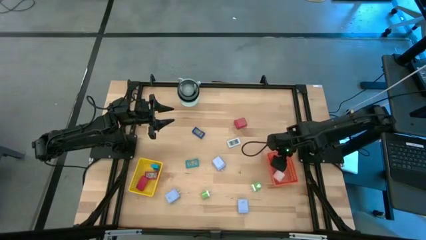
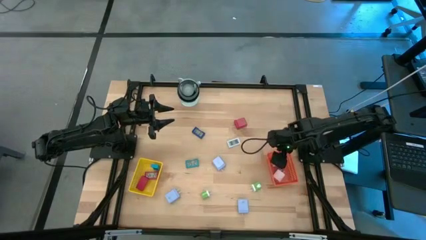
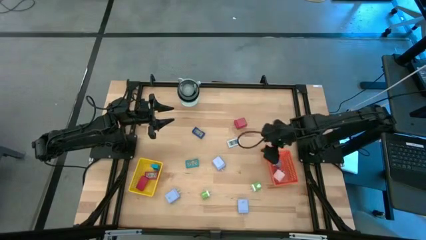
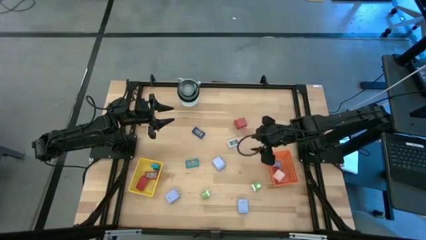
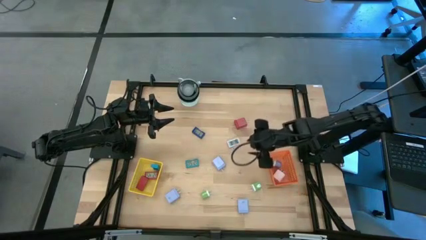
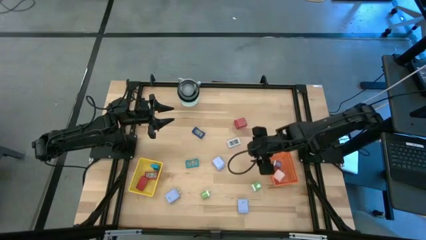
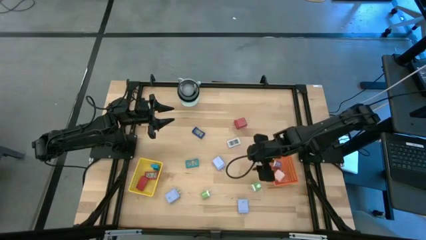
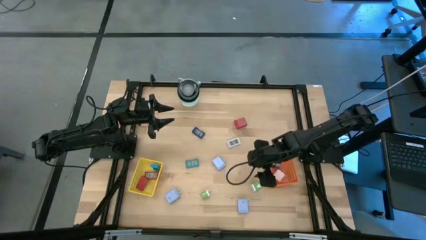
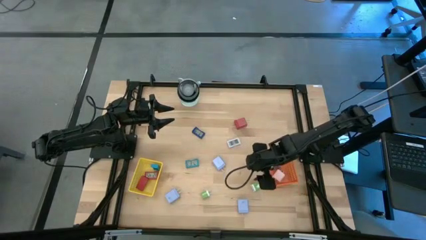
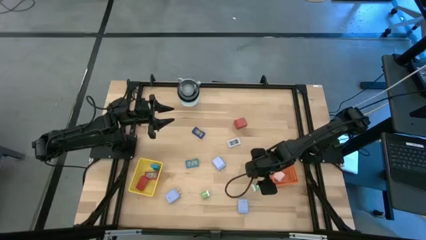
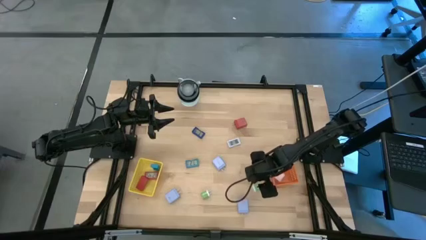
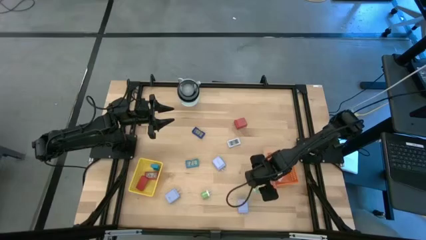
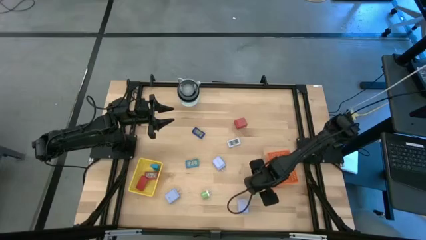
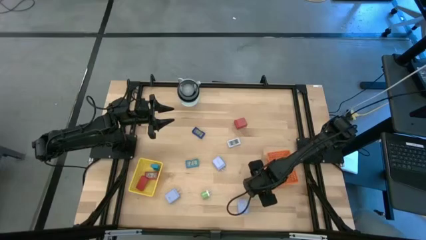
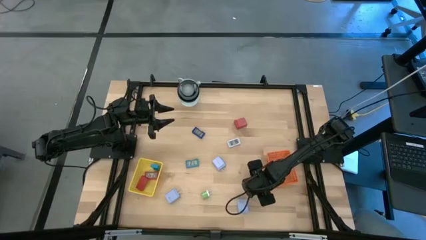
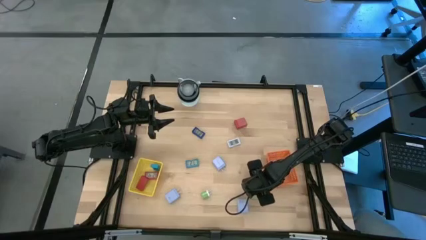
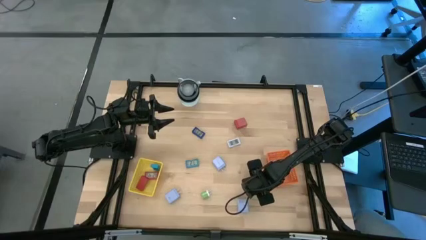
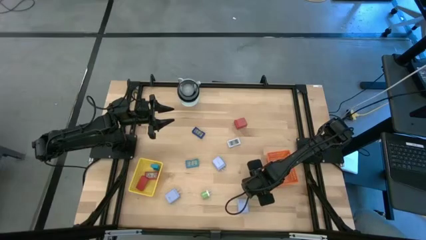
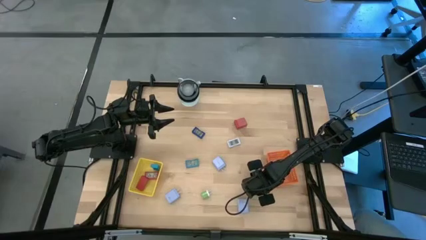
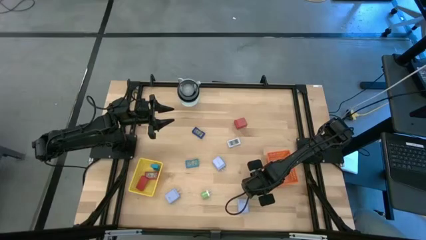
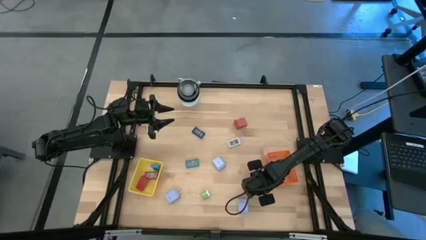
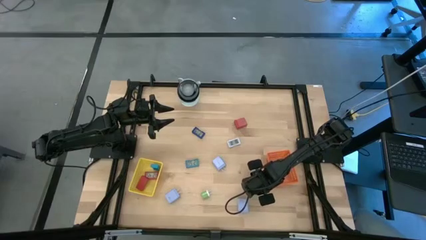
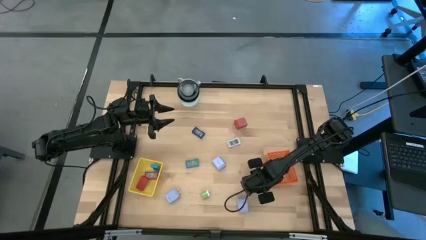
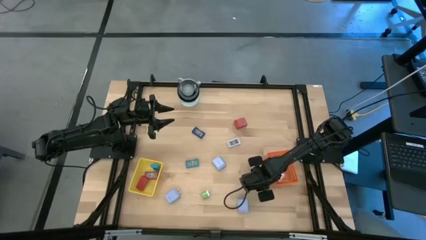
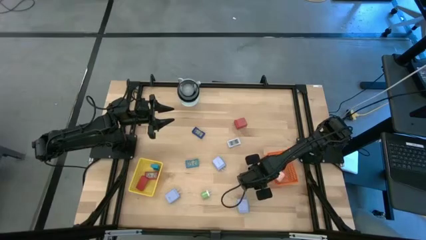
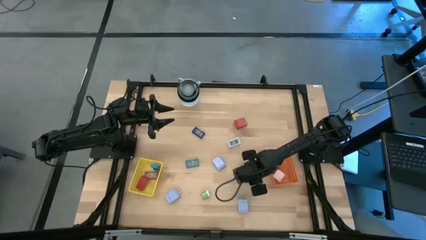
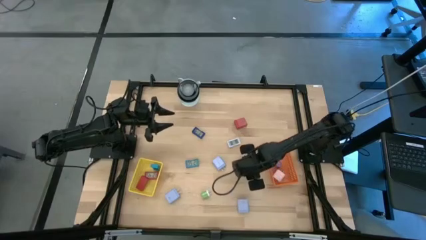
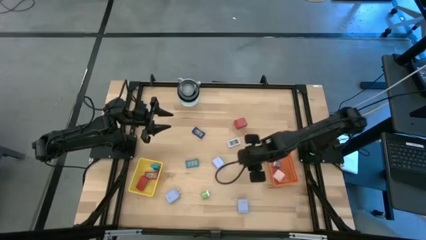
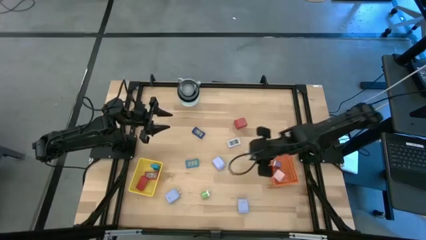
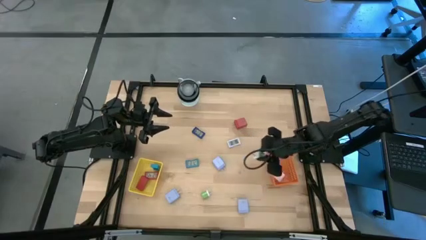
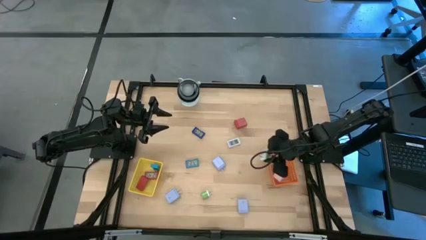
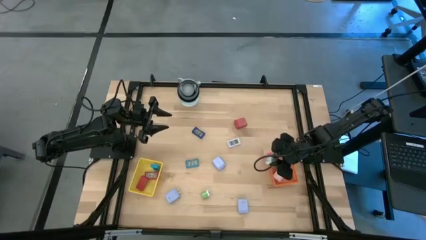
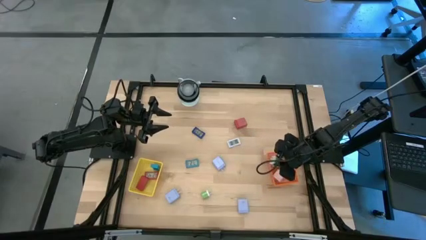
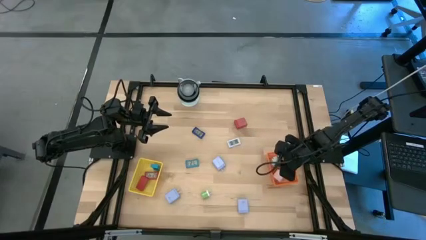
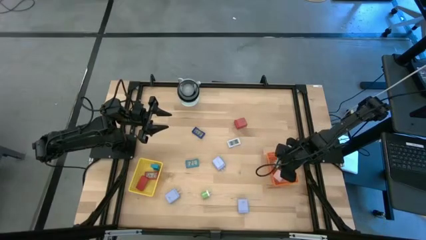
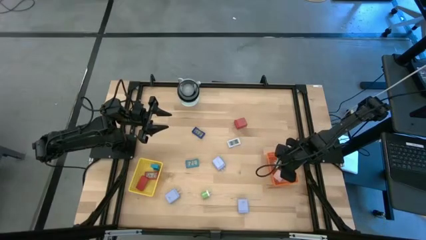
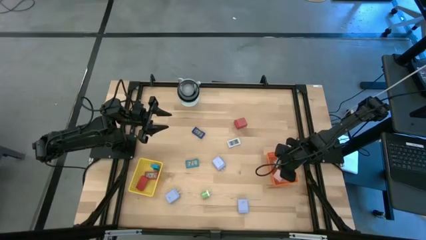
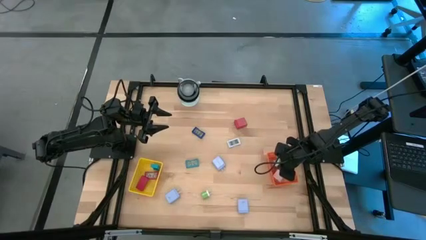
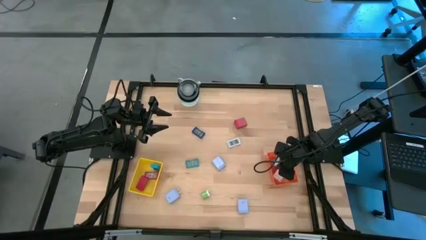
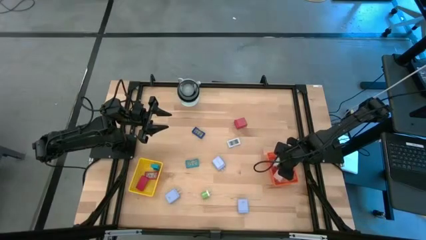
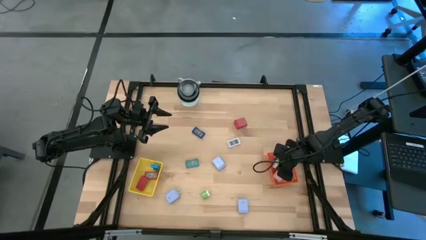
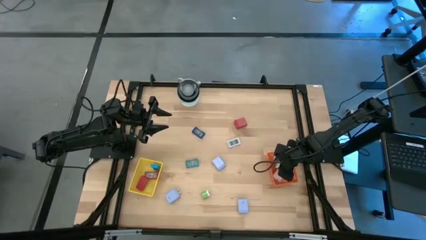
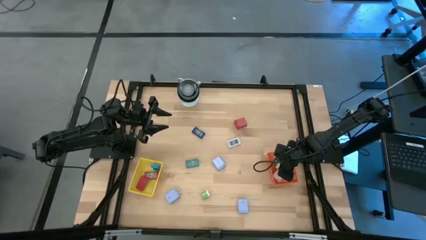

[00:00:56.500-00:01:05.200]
Task: Pick & Place Office items
Put the right green charger adapter into the orange basket

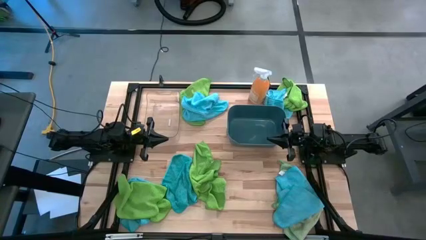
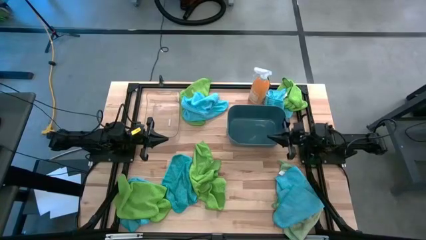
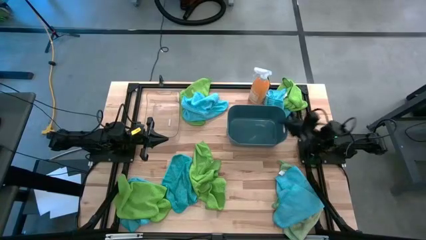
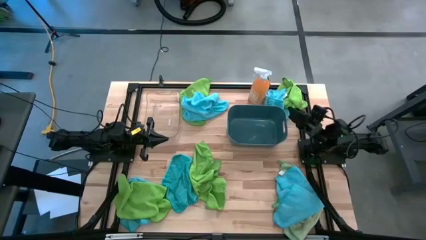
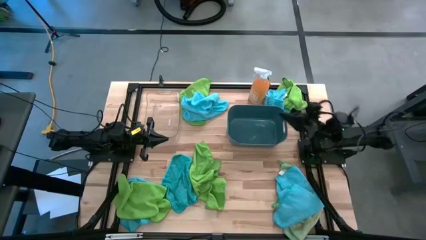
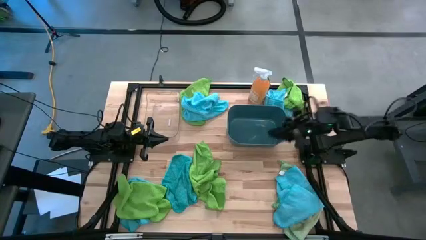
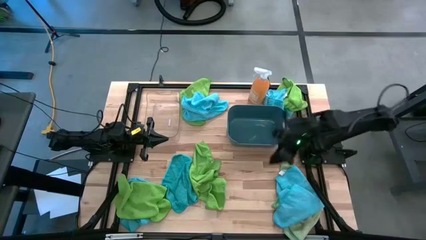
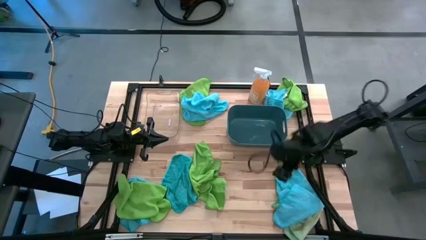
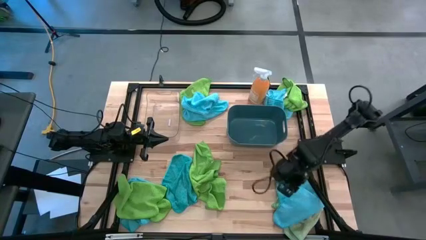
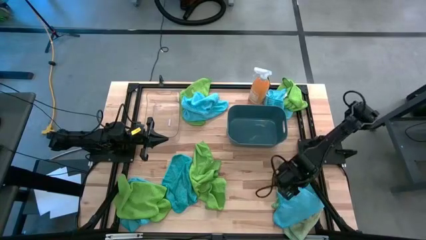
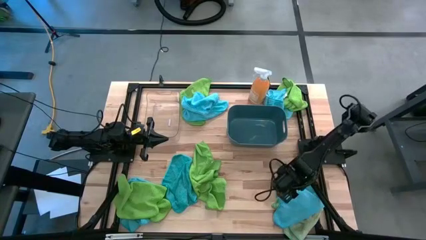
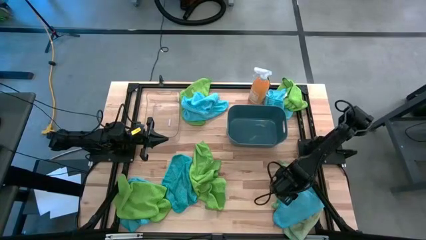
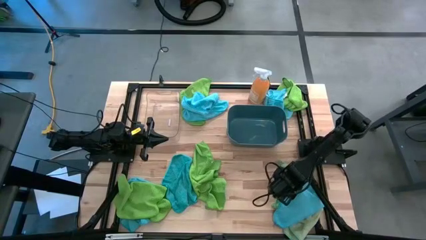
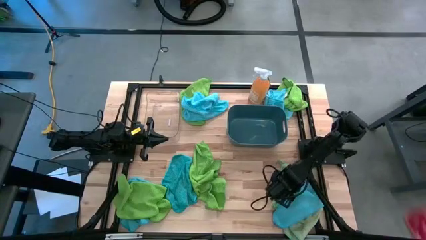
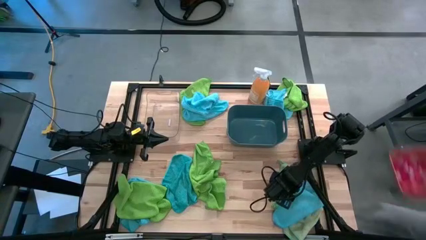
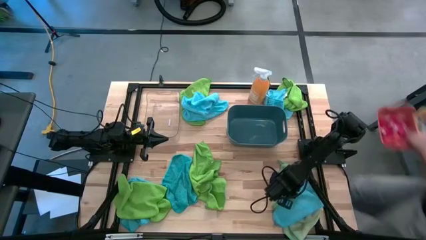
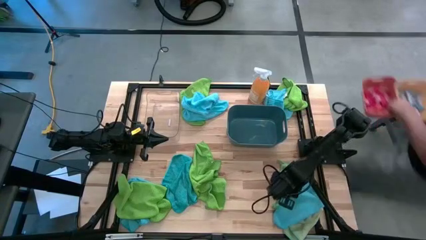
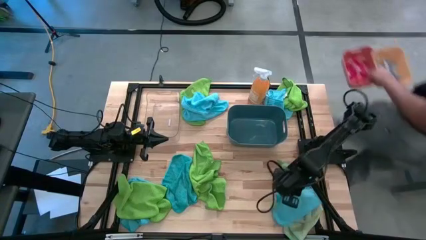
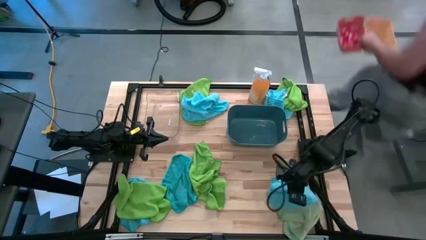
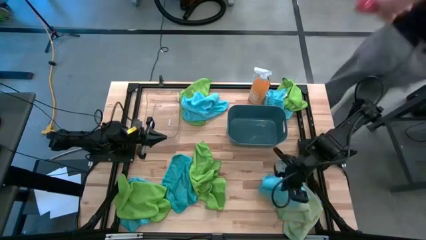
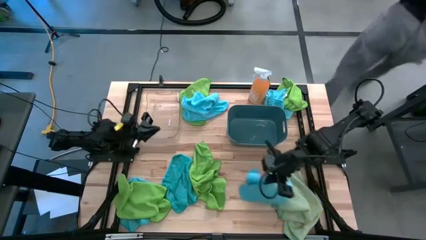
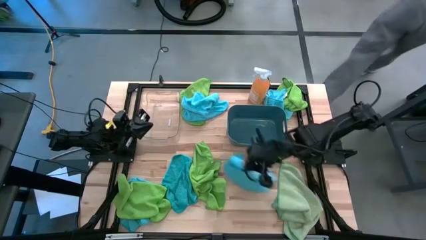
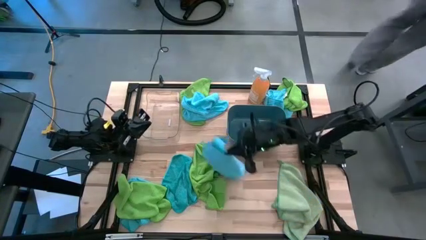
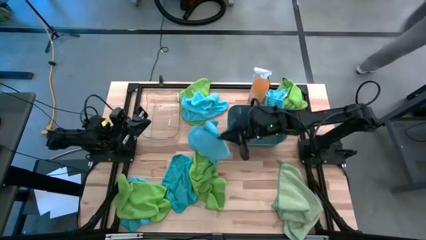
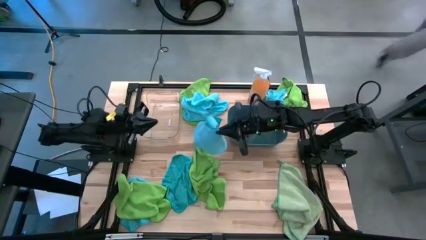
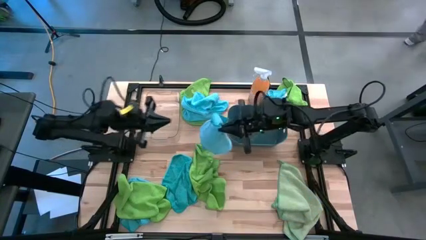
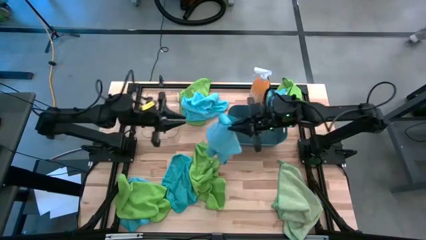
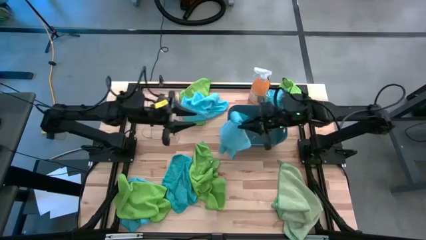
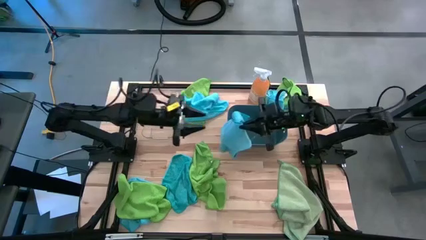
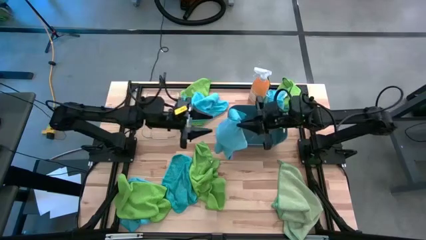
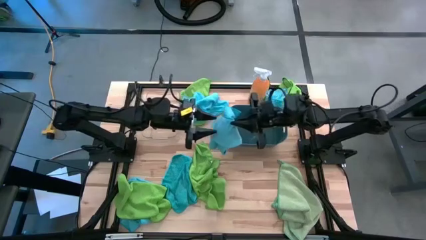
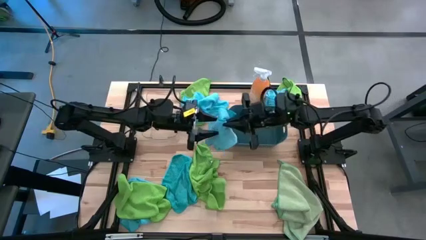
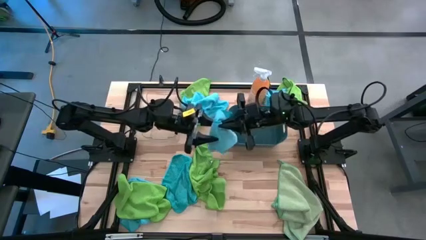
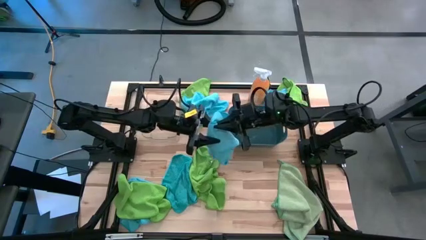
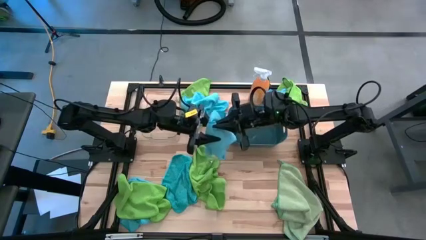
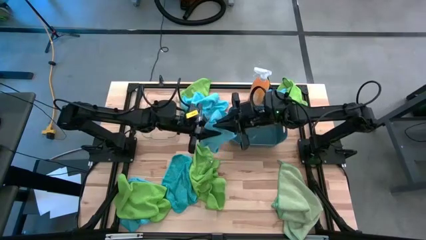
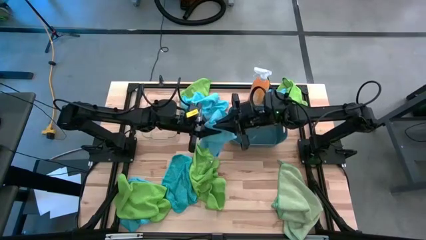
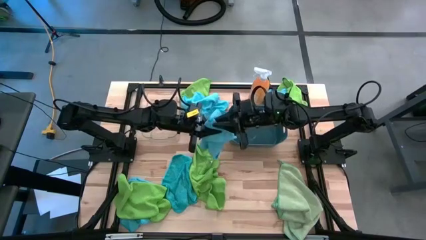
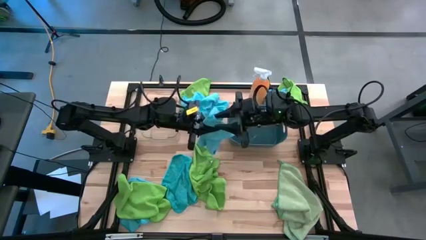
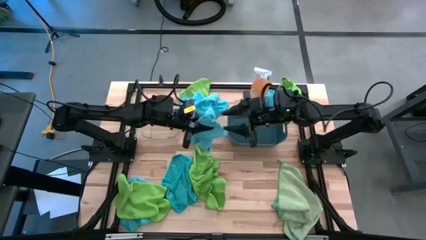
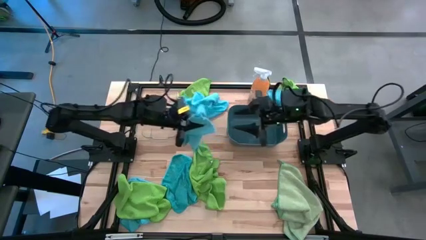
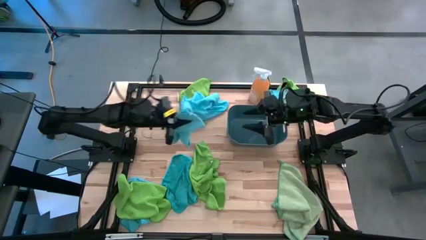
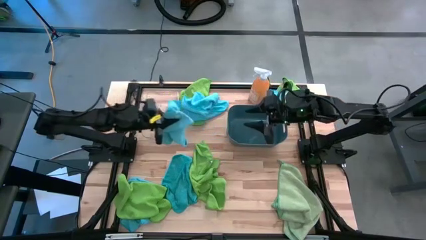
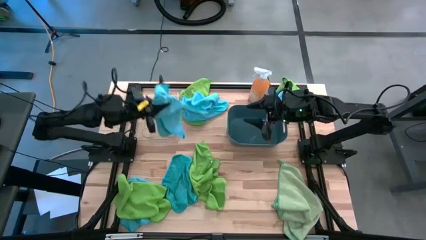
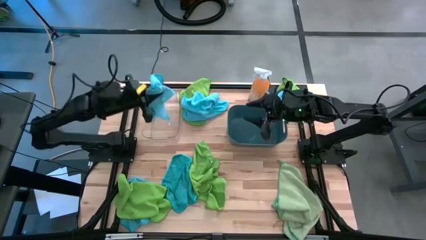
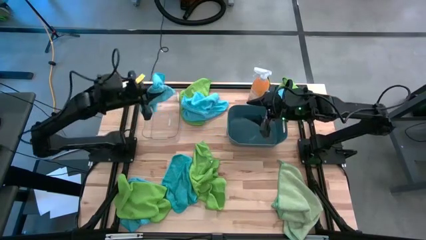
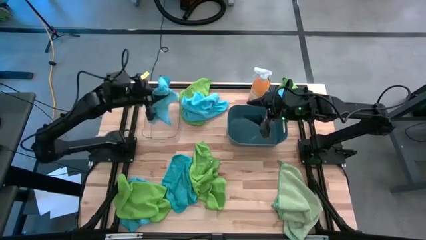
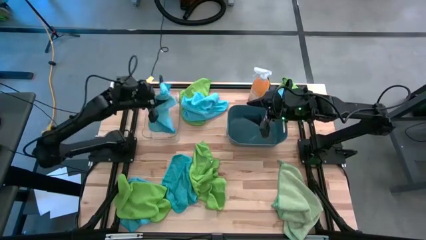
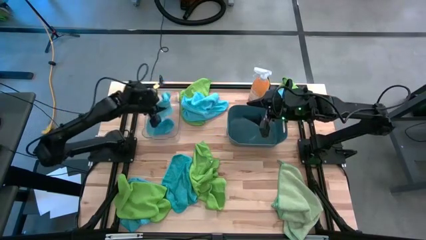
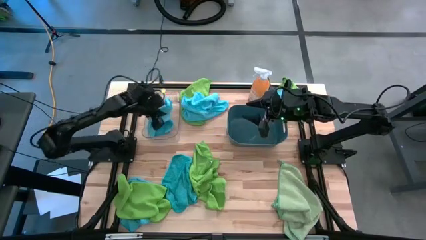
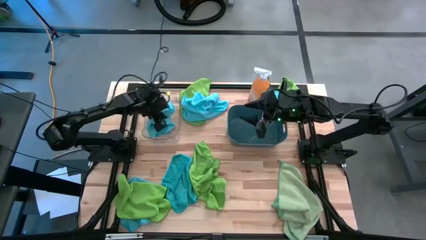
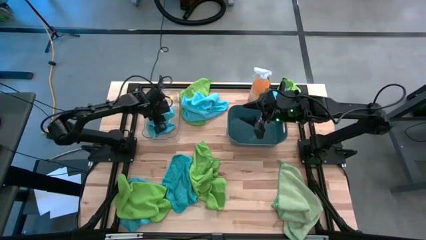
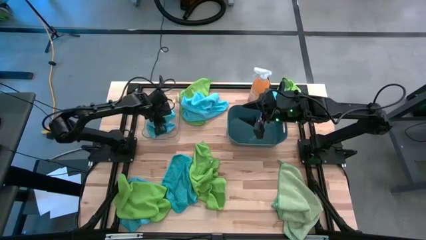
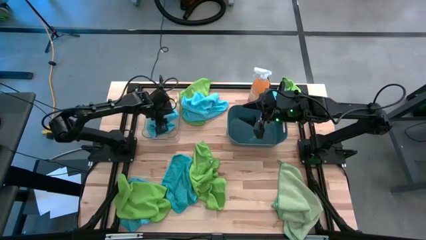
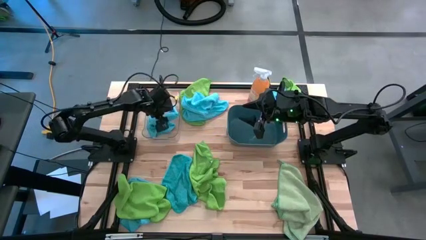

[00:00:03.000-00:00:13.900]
Task: Sort microfiber towel by color & place in baskets
Put the blue microfiber towel into the transparent bin
